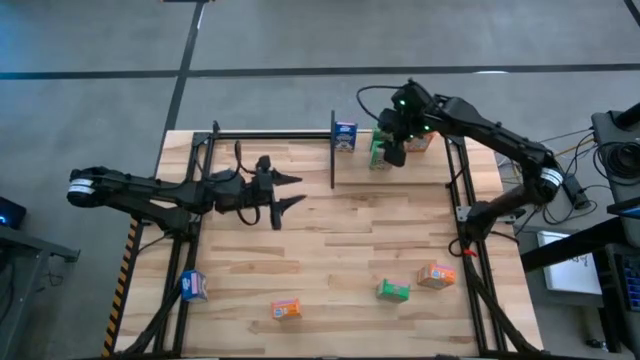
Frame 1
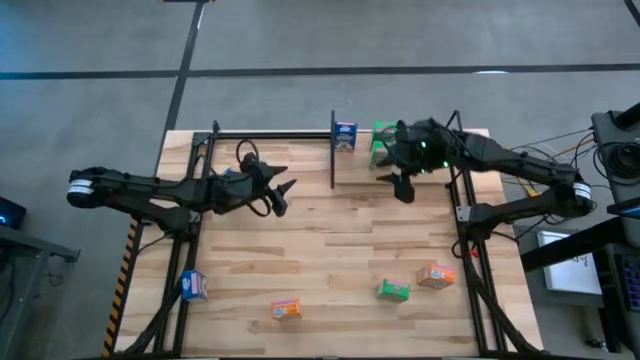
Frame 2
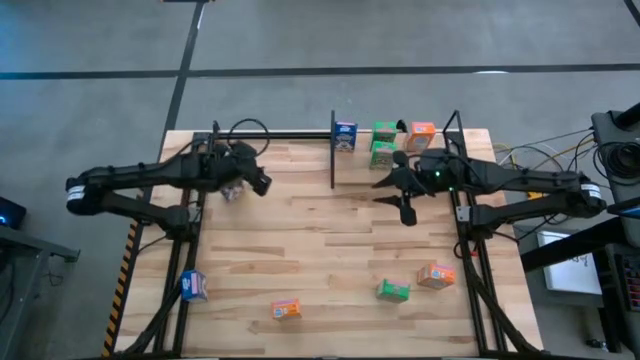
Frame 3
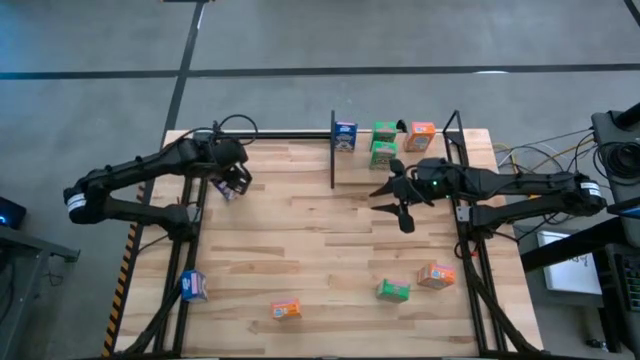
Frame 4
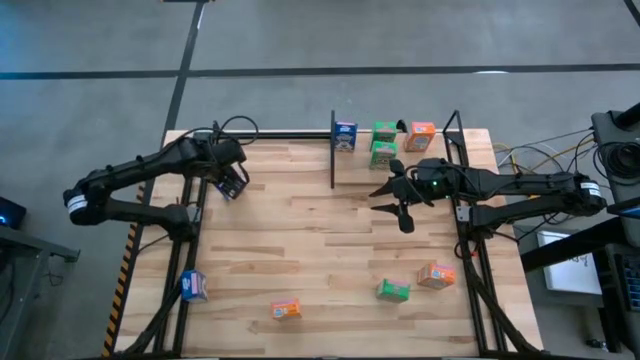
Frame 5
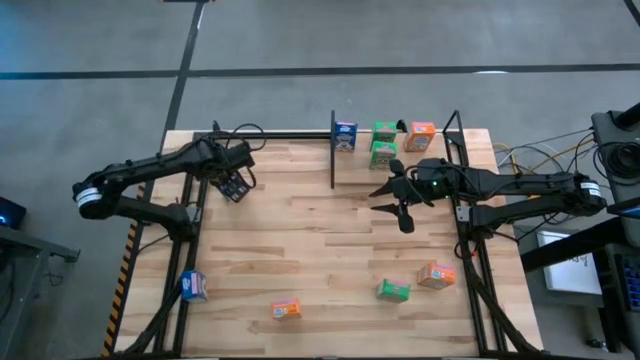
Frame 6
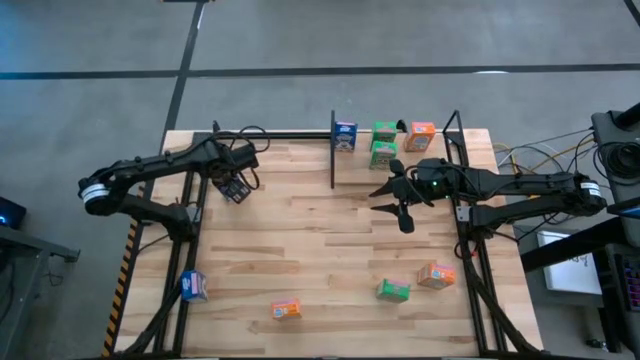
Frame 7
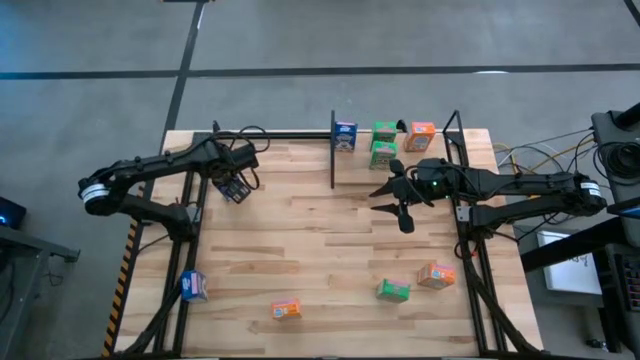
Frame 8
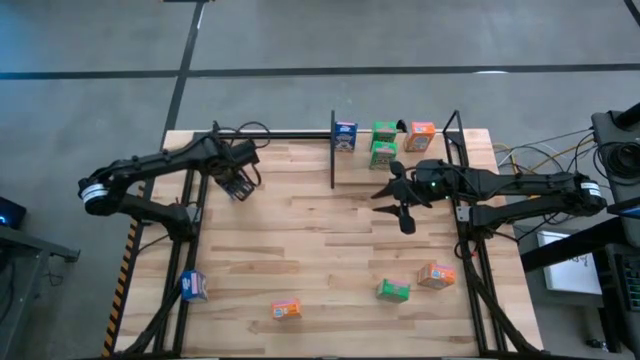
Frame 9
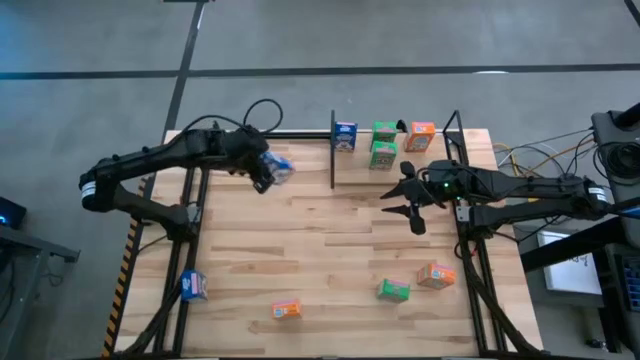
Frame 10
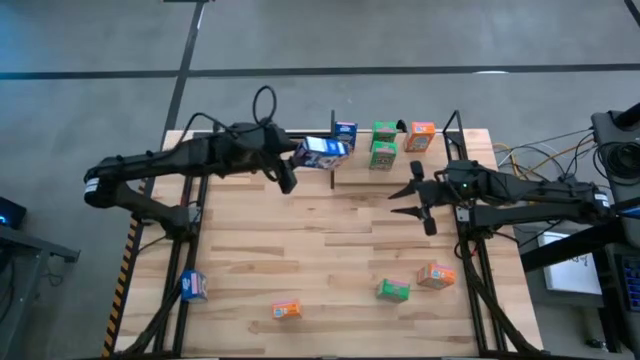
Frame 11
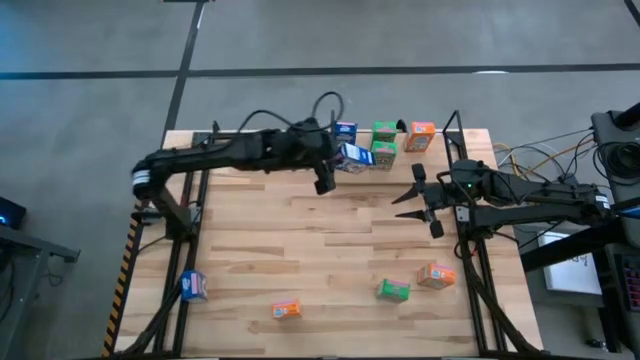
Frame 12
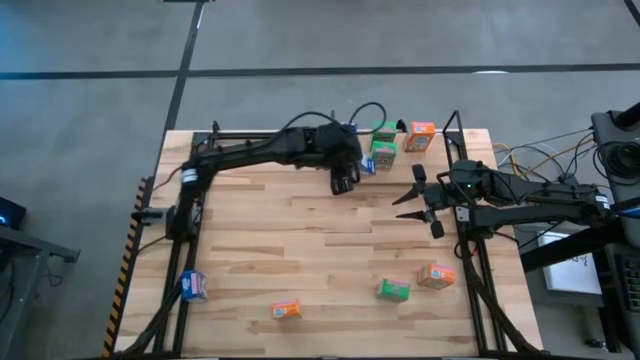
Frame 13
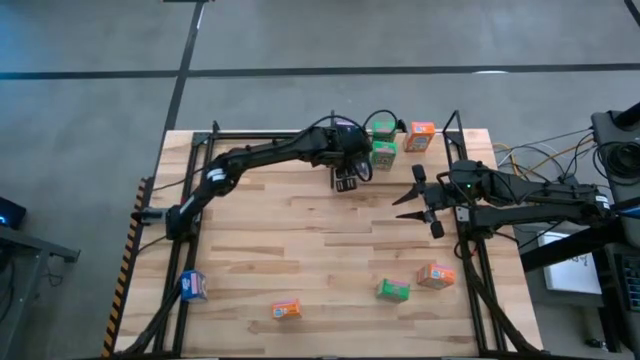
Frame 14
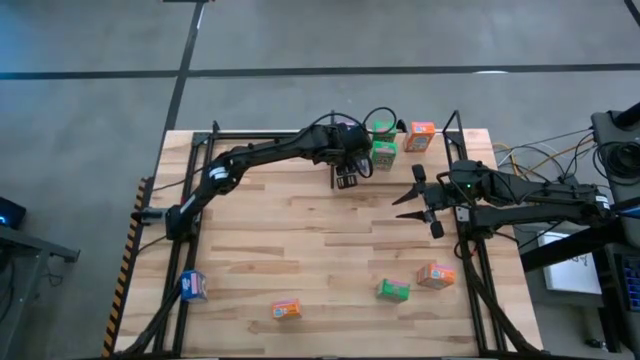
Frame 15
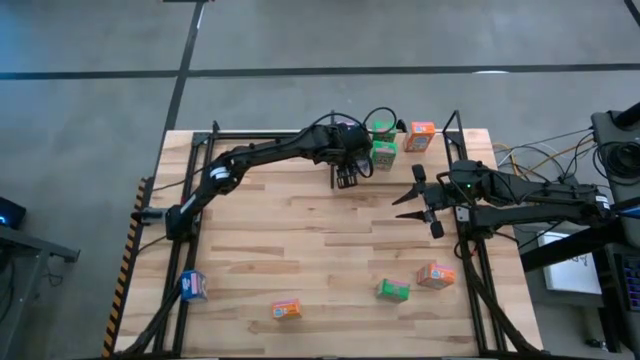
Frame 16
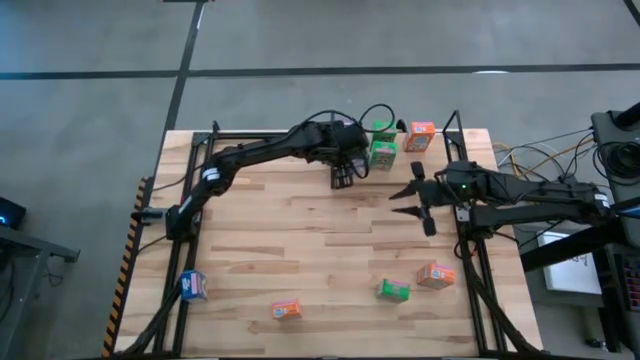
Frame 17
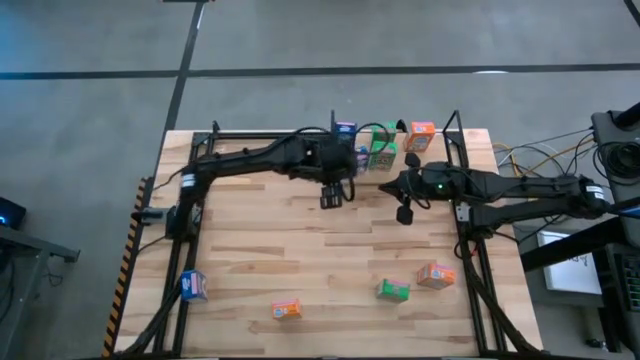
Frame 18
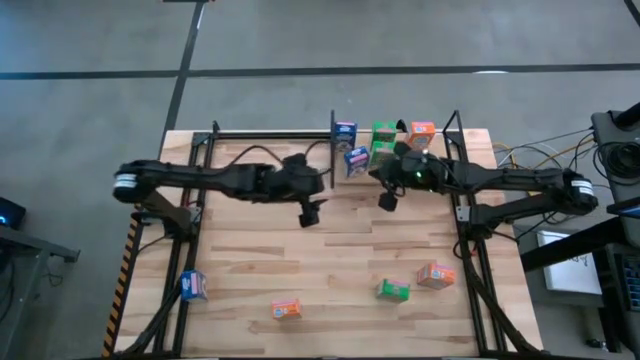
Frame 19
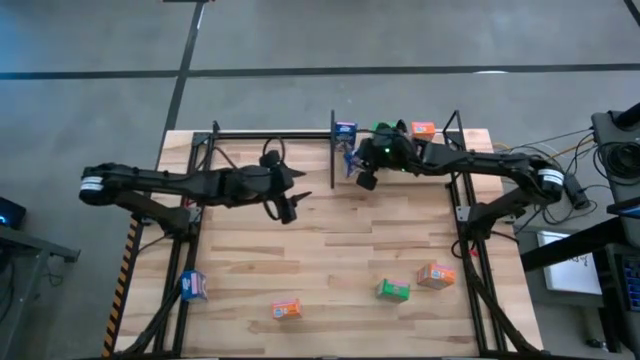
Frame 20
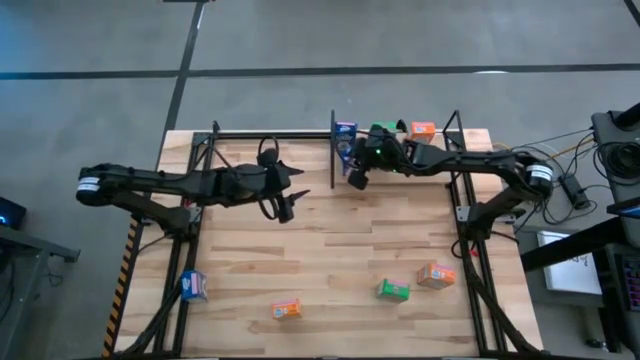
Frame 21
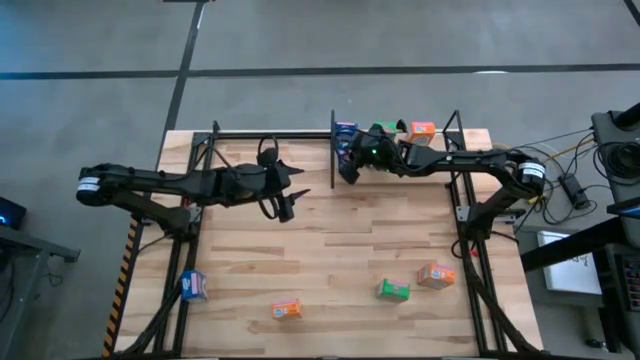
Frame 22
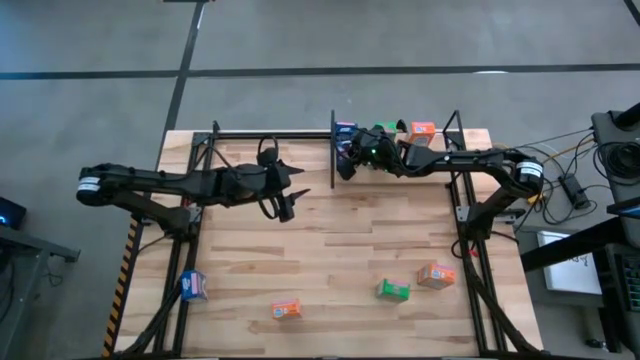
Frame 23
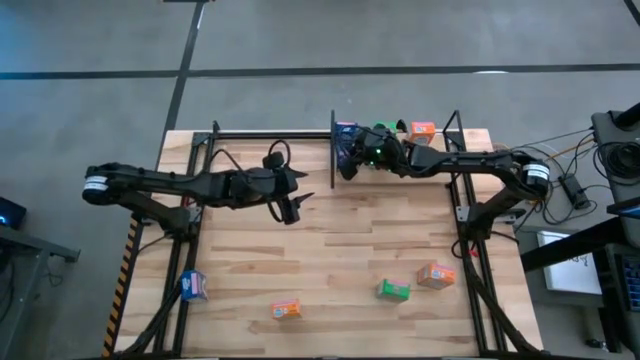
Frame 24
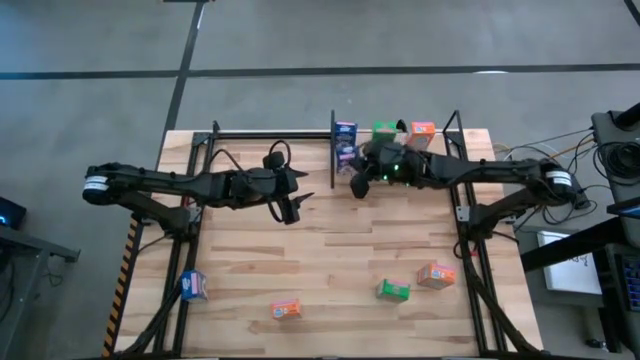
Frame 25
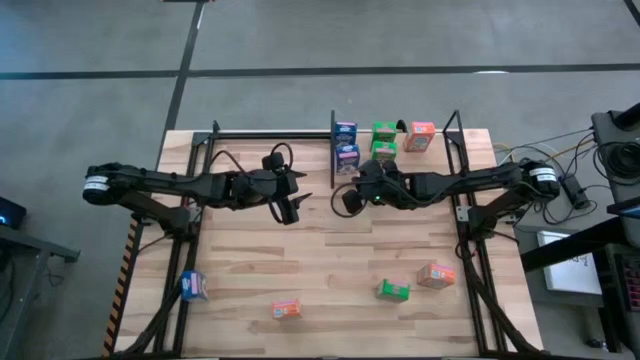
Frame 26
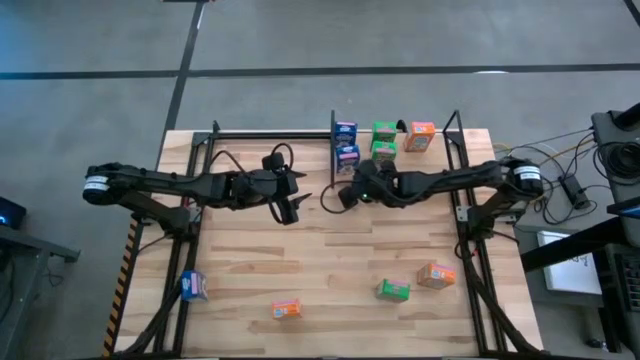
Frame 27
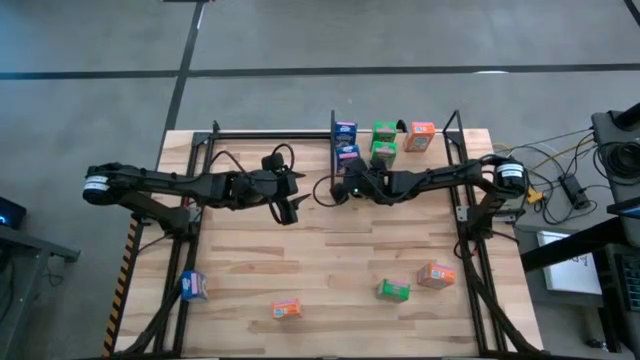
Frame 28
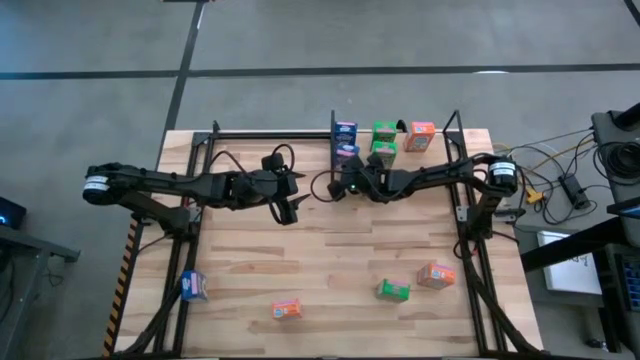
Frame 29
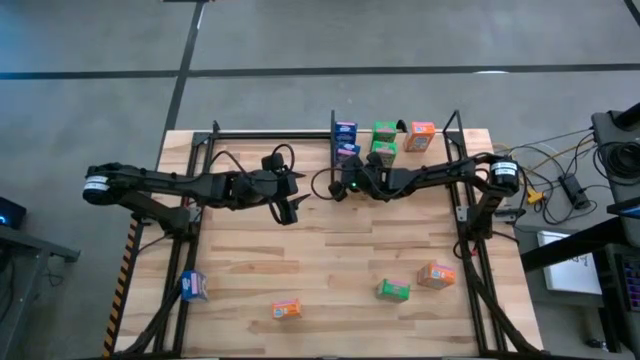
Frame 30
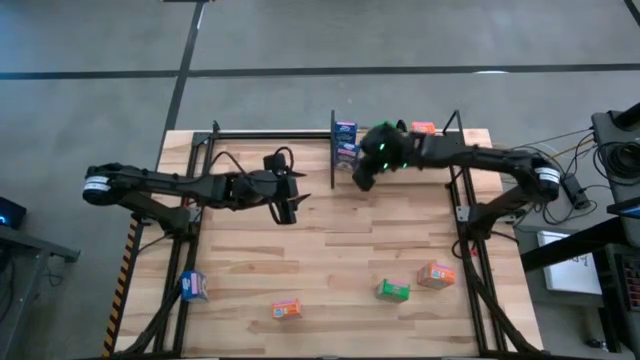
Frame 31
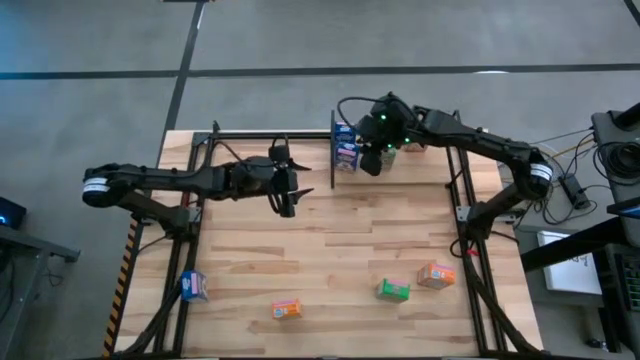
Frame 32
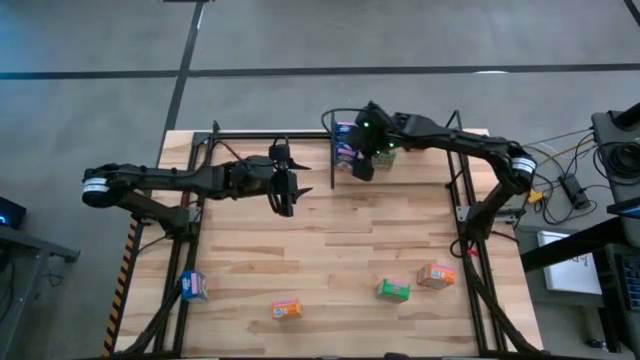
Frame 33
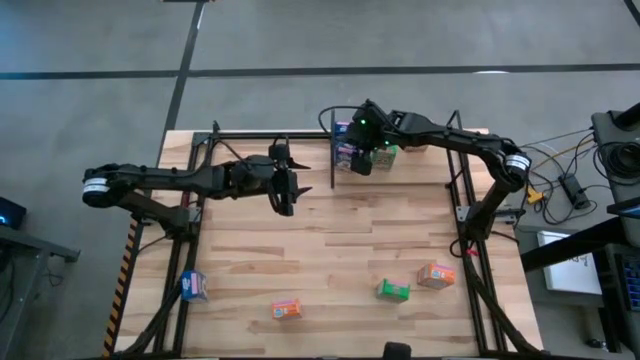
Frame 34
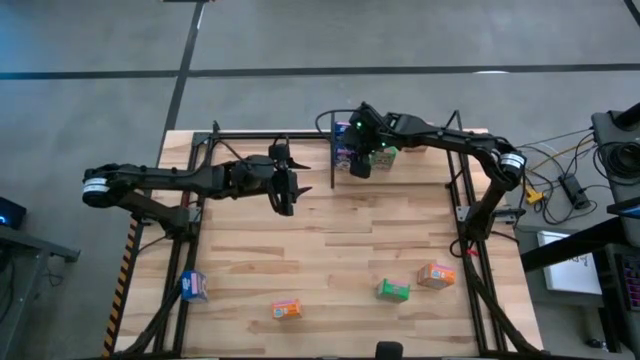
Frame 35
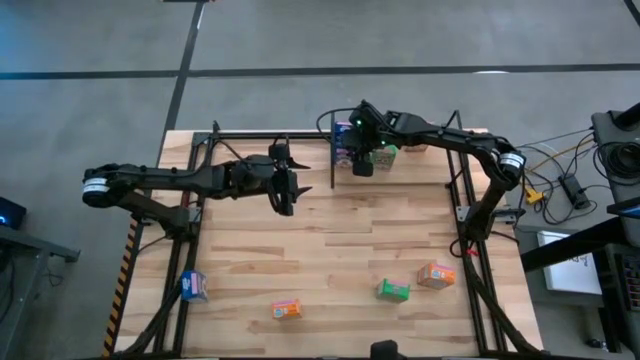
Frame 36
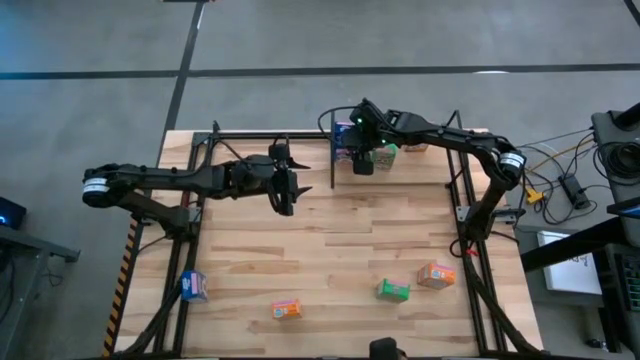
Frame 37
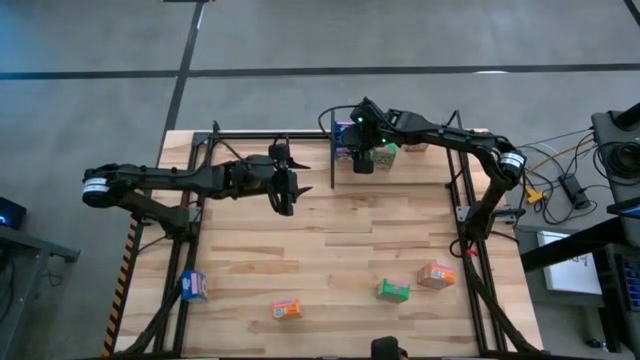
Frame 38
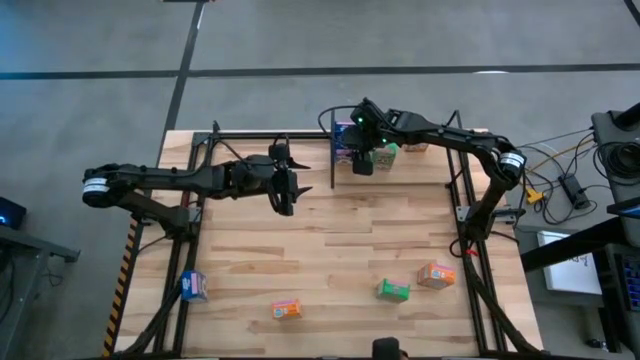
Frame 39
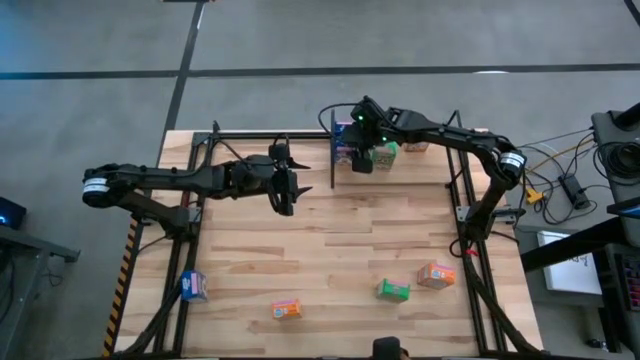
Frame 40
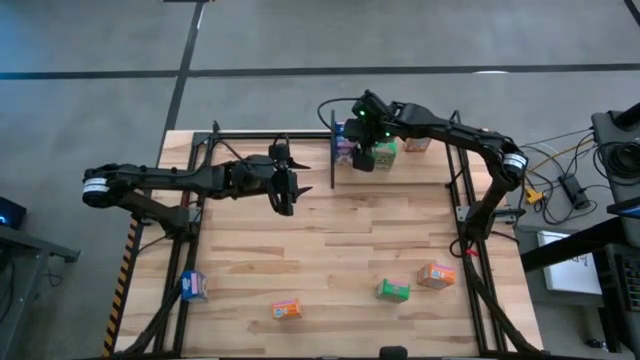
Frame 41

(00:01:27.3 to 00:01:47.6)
Task: Stack cereal on shelf
Put the top blue cereal box on the shelf aligned with the other blue cereal box on the shelf
